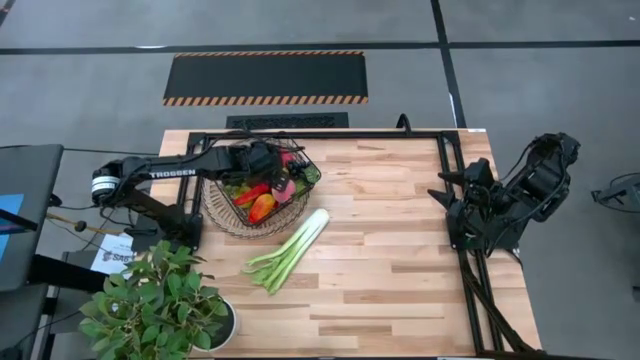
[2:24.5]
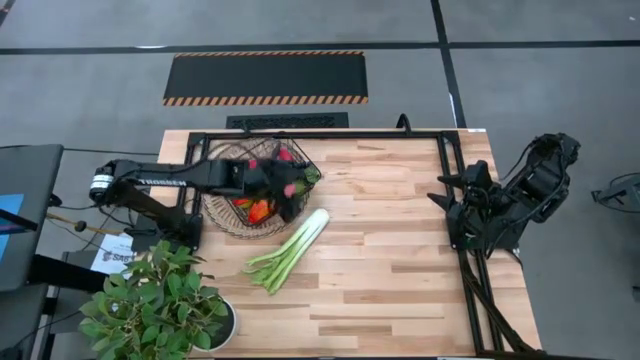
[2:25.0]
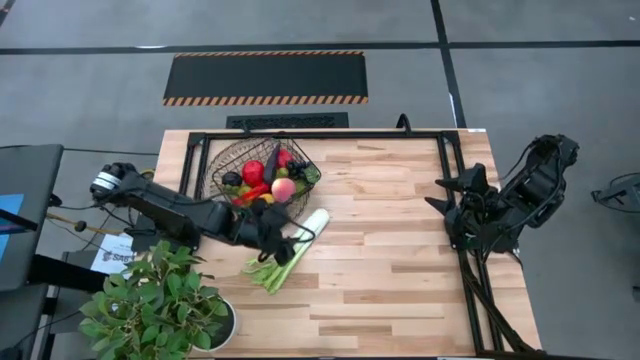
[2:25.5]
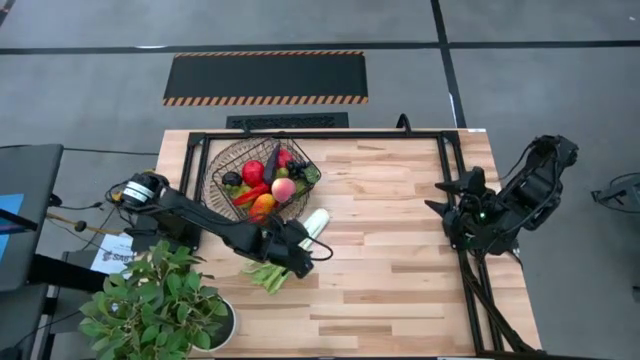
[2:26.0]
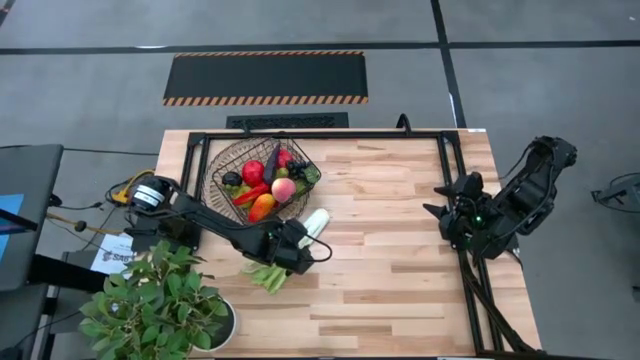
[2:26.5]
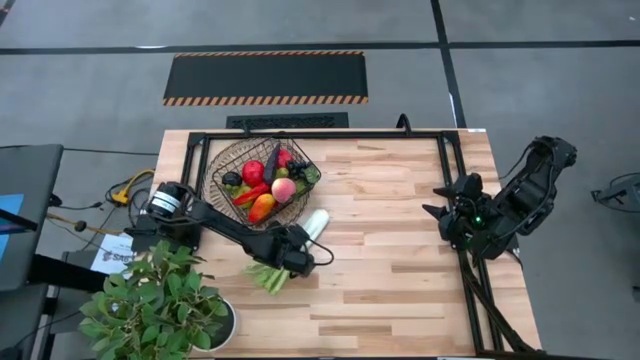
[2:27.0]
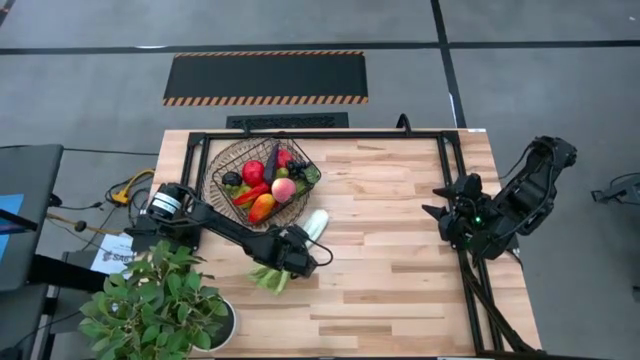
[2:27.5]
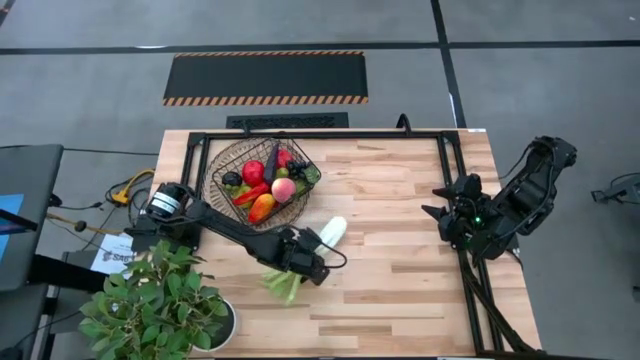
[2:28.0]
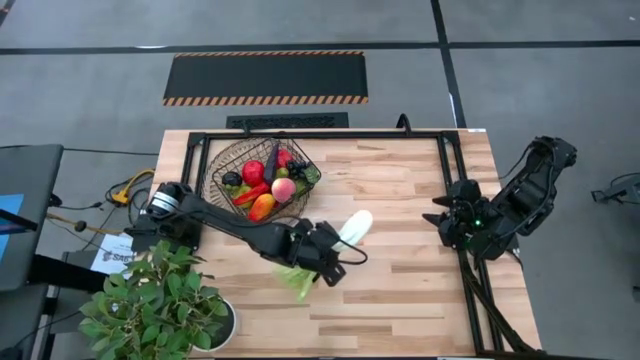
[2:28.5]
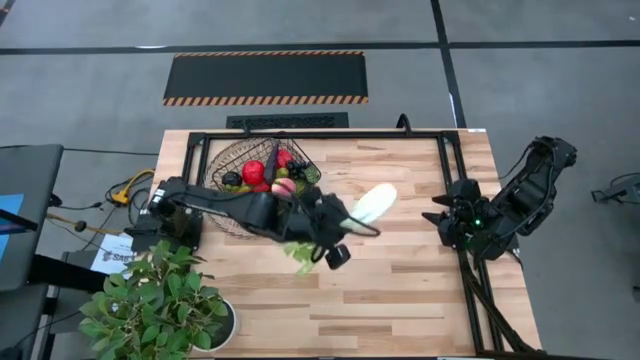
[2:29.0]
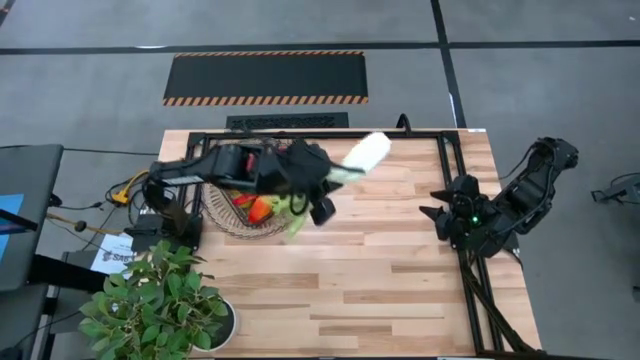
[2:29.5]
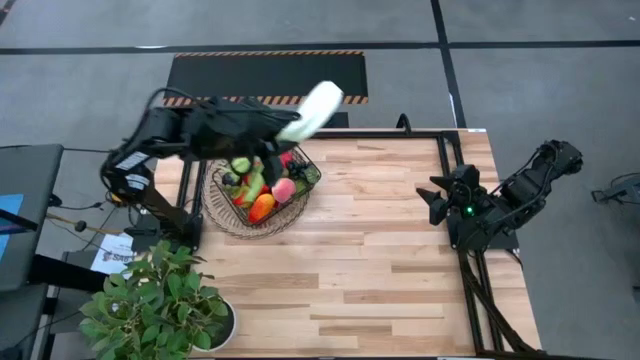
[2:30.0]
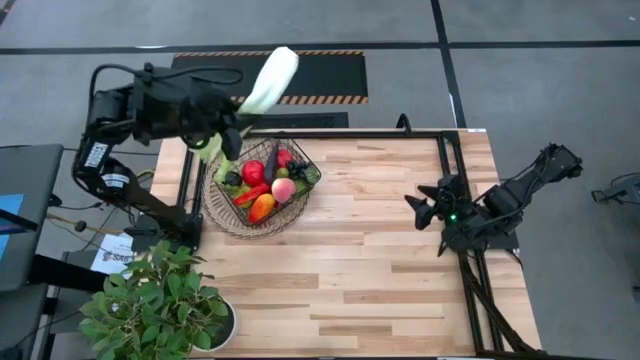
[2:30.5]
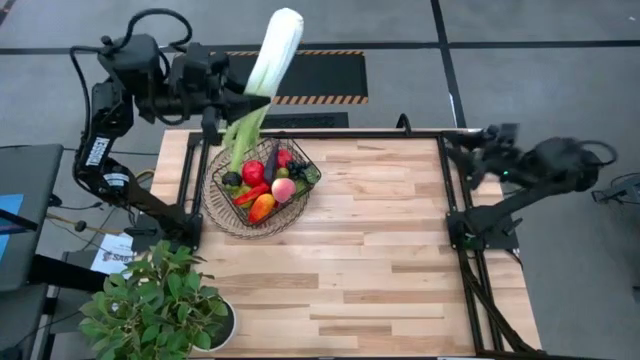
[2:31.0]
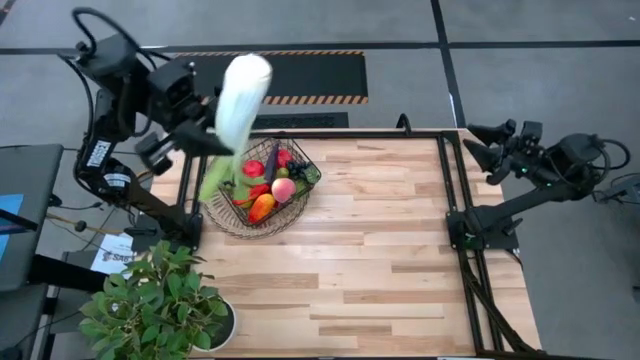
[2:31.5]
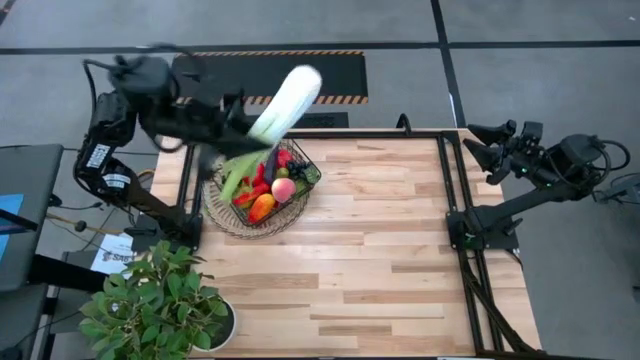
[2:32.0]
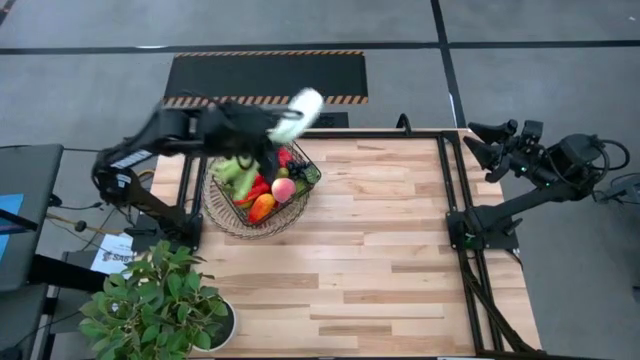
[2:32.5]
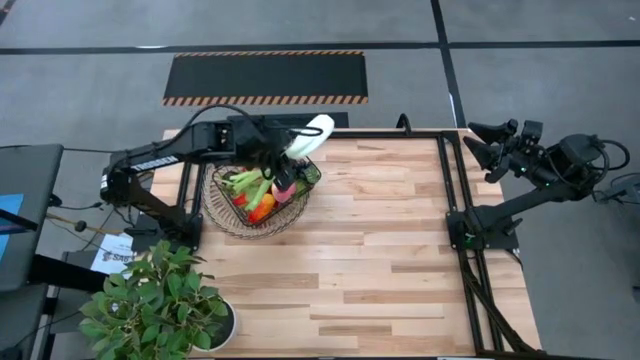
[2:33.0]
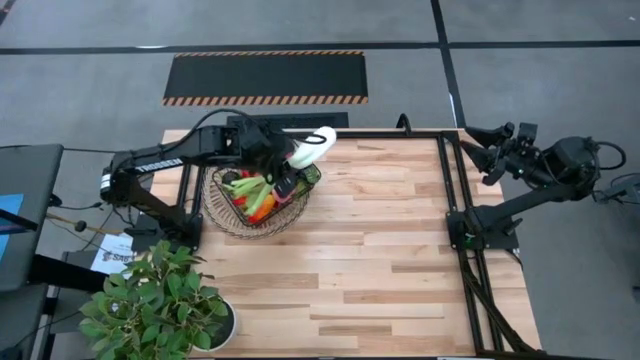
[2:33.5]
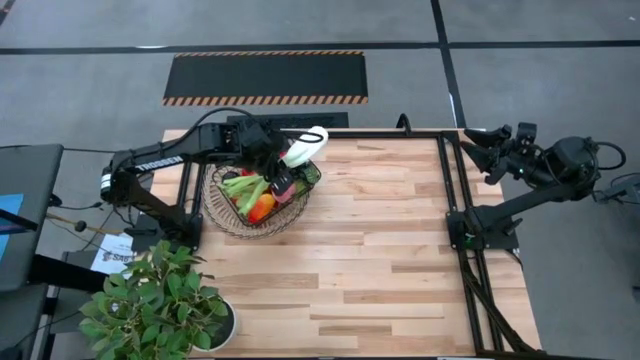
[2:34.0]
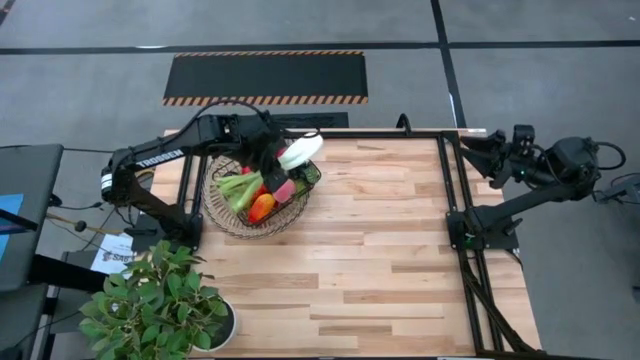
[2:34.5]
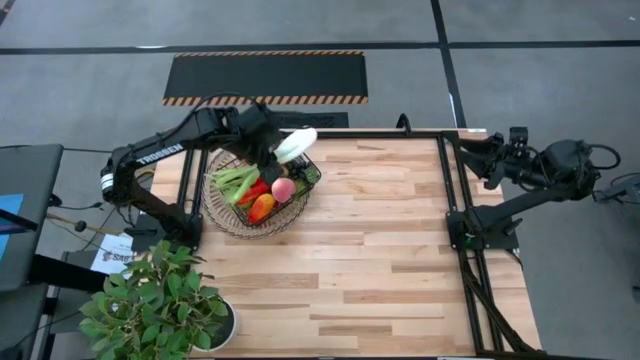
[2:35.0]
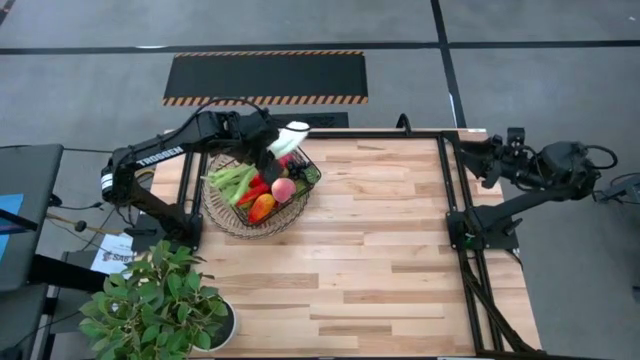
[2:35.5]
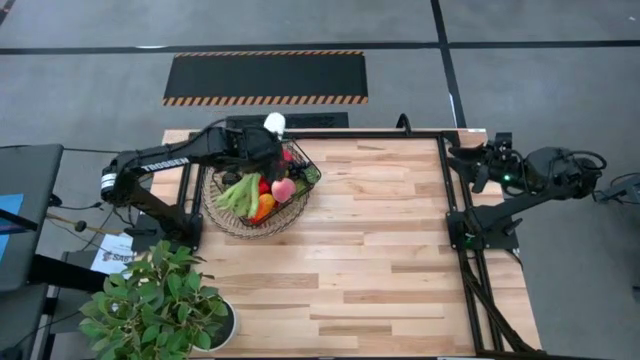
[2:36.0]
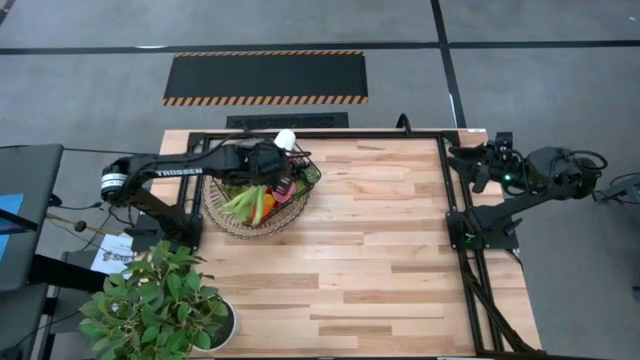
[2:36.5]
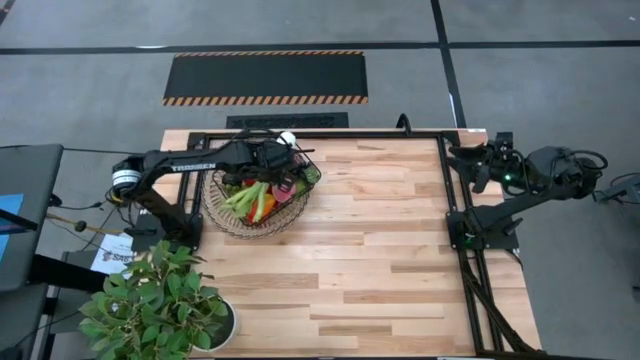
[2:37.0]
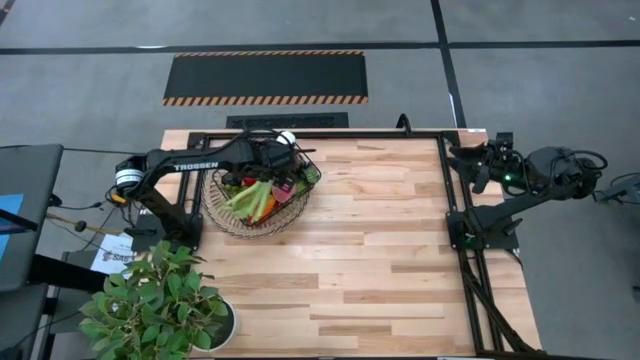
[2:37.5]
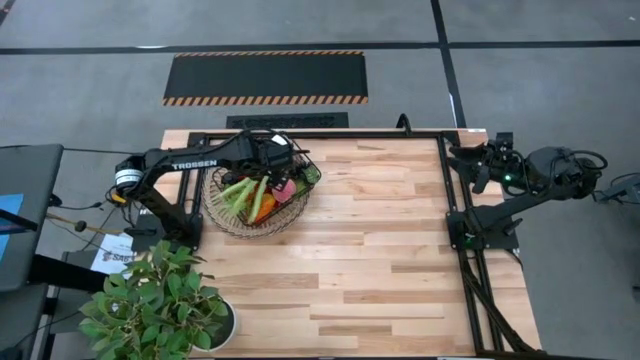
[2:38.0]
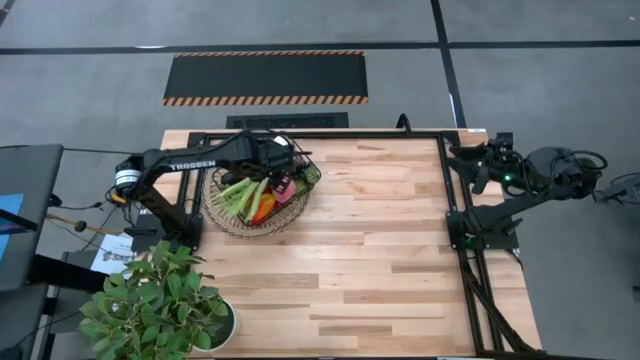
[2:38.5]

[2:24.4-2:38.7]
Task: Build produce basket
Put the green celery into the wire basket

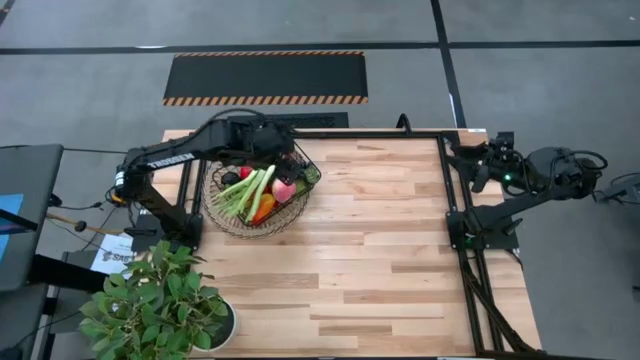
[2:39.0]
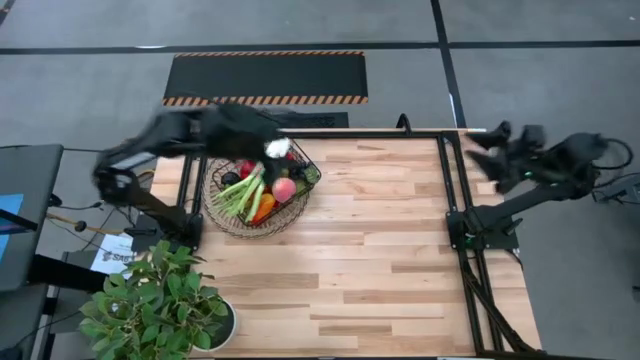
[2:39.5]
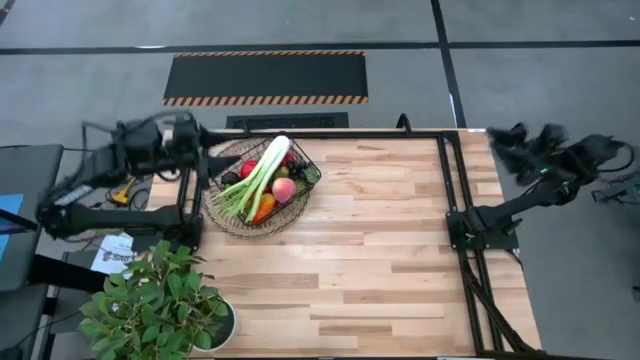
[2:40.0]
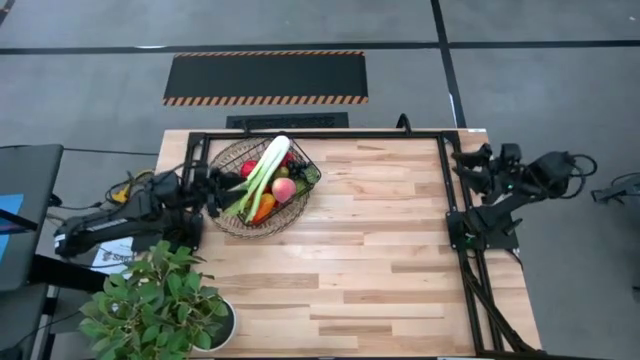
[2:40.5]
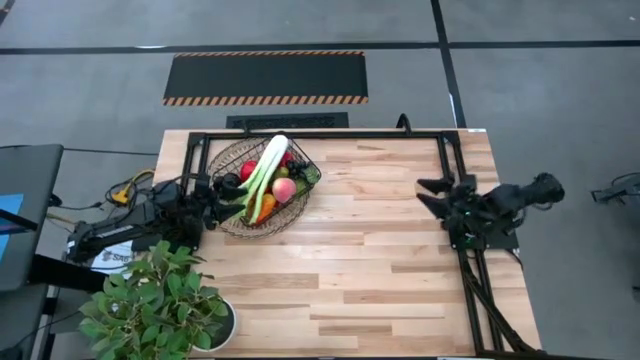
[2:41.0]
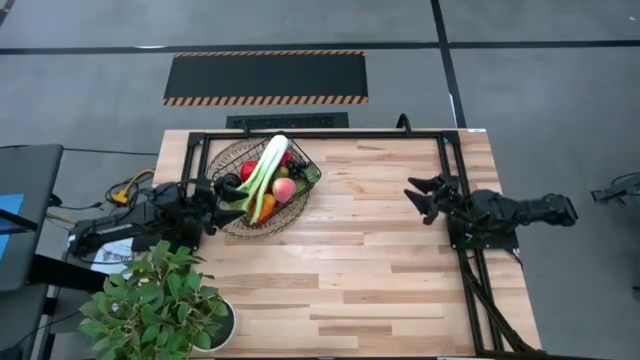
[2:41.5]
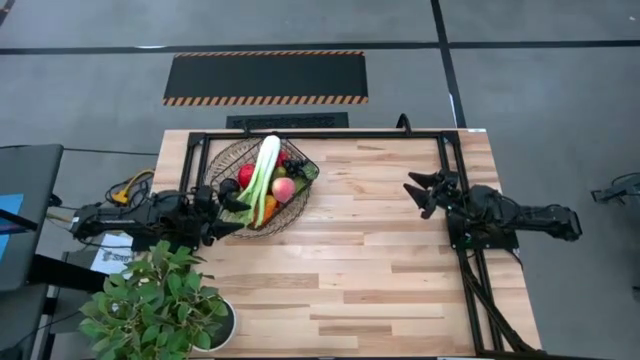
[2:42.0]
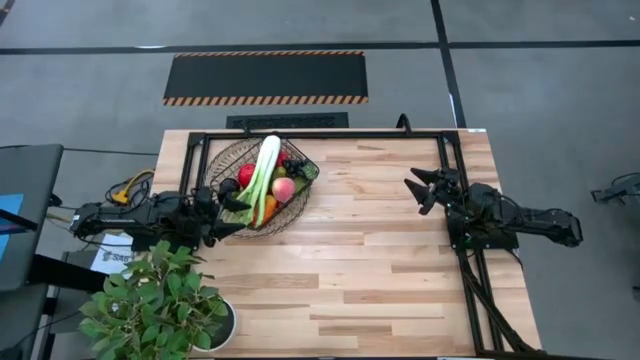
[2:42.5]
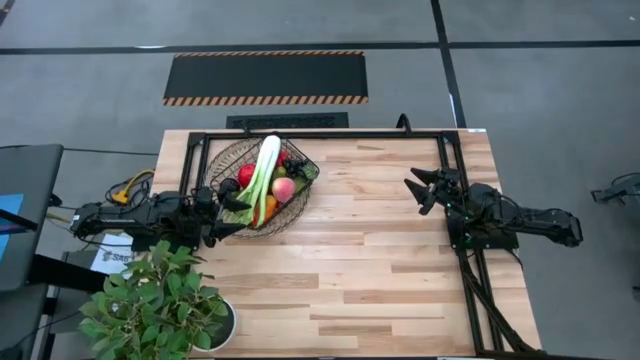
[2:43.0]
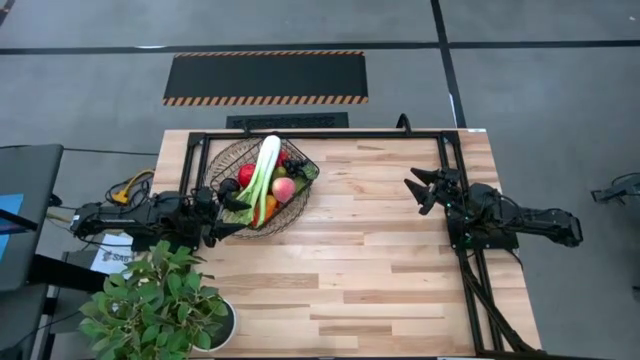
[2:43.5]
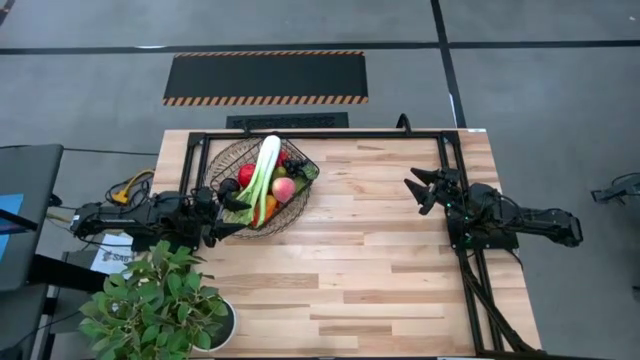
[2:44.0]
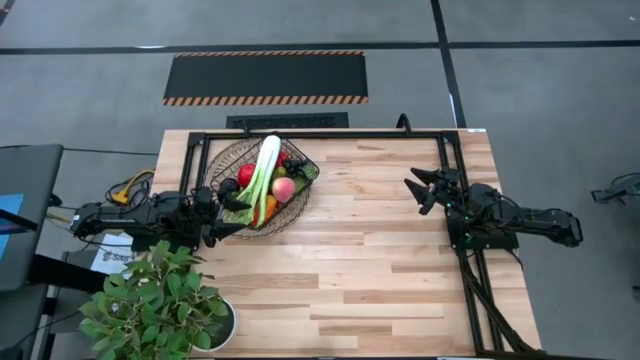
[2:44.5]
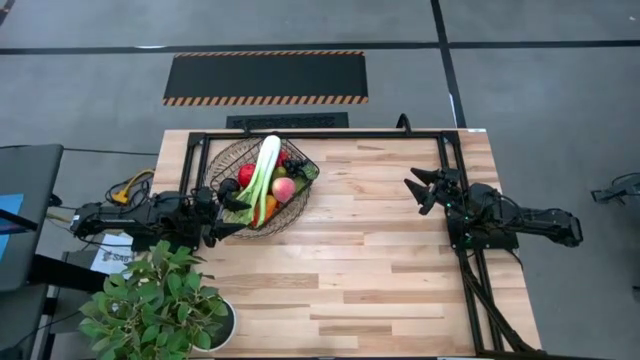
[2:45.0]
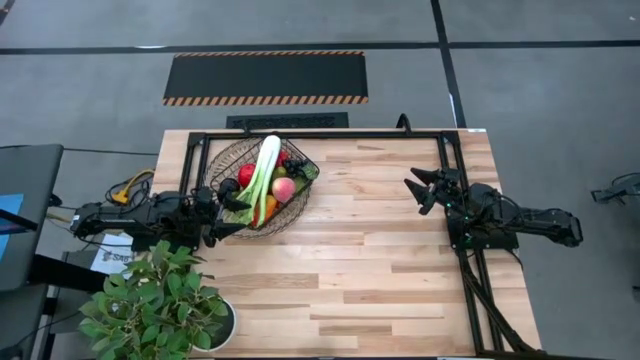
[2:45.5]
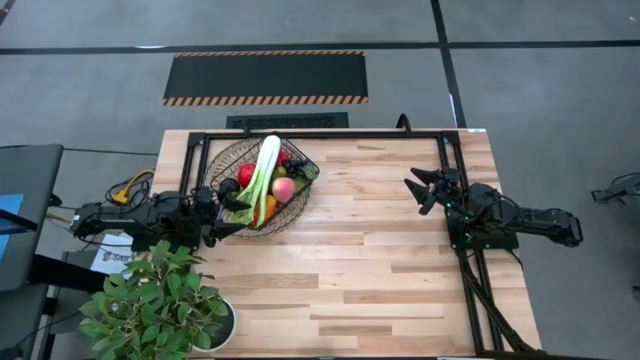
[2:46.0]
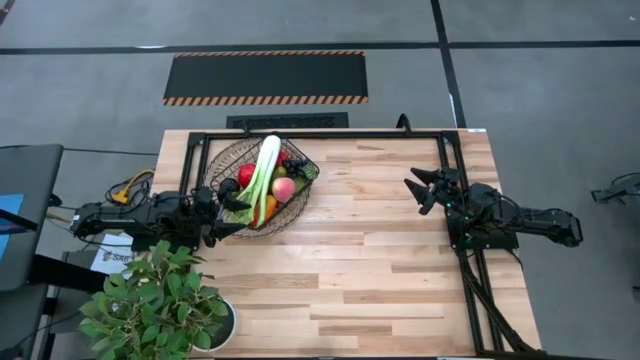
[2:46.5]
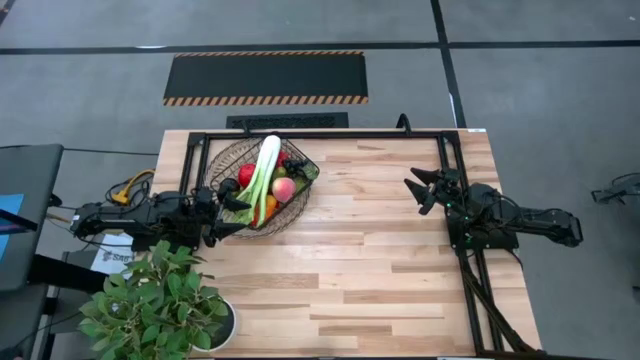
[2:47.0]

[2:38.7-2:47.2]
Return to Home Position
